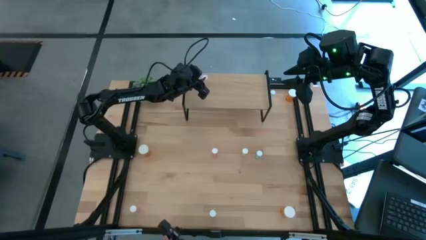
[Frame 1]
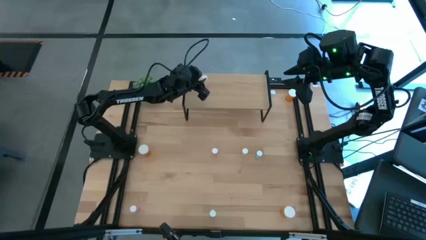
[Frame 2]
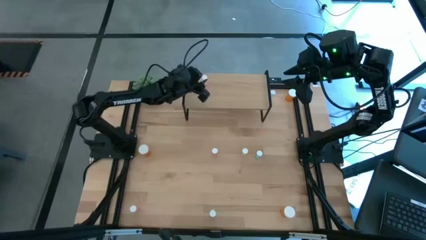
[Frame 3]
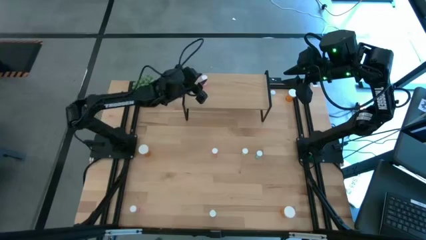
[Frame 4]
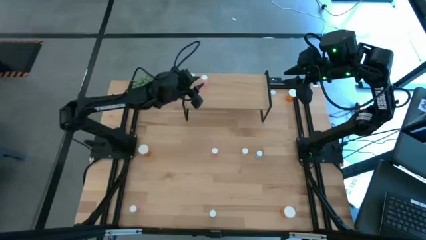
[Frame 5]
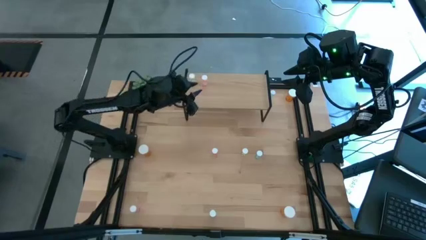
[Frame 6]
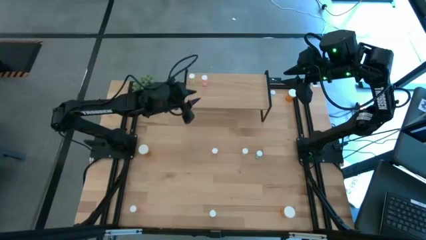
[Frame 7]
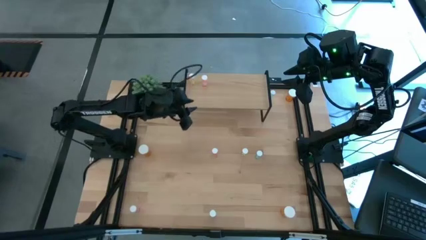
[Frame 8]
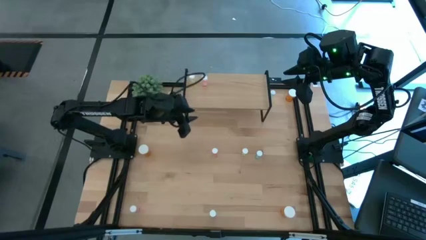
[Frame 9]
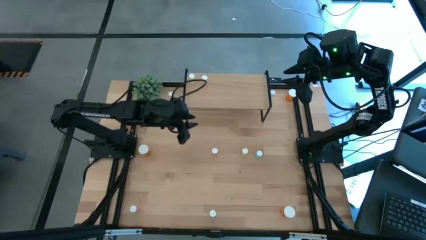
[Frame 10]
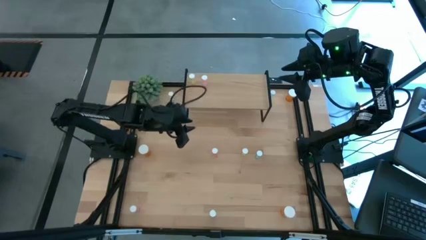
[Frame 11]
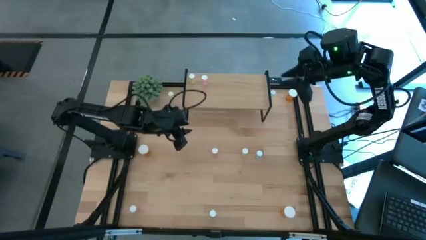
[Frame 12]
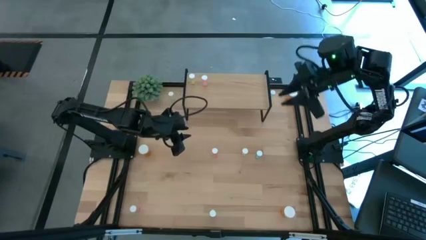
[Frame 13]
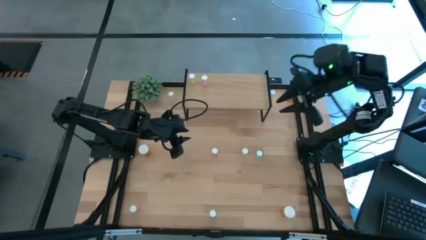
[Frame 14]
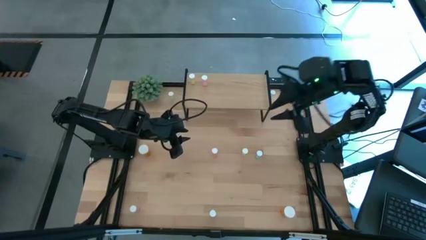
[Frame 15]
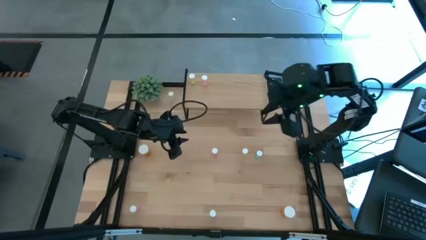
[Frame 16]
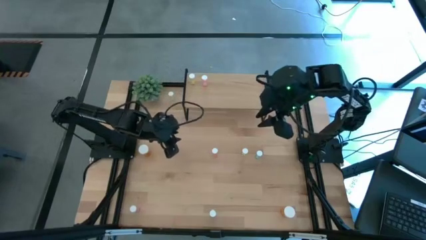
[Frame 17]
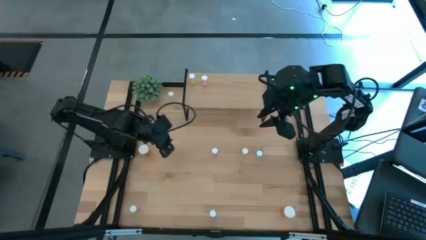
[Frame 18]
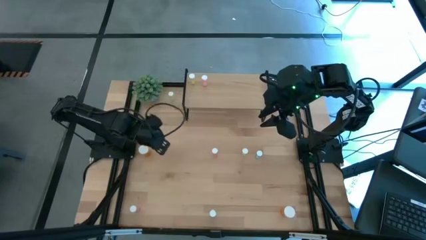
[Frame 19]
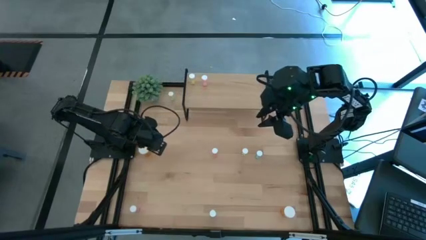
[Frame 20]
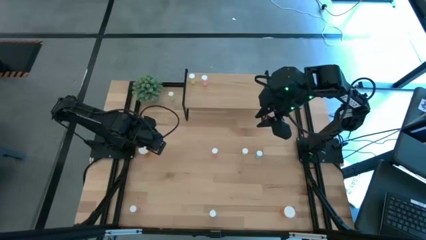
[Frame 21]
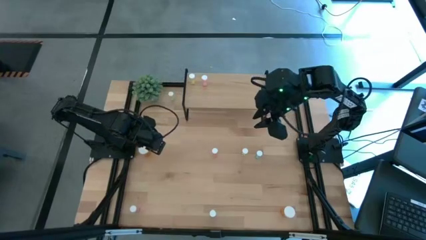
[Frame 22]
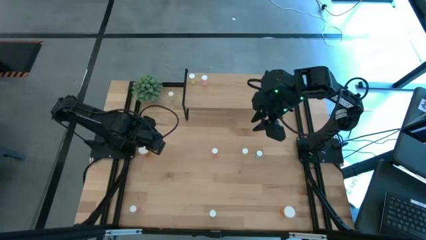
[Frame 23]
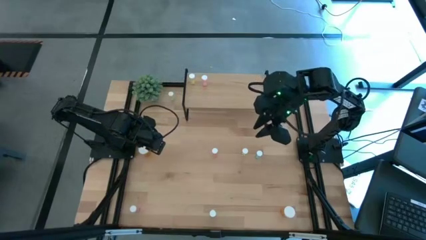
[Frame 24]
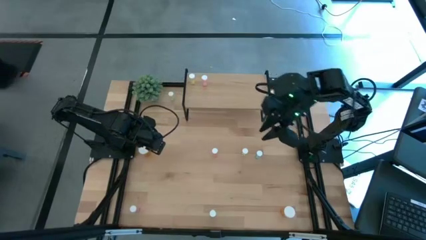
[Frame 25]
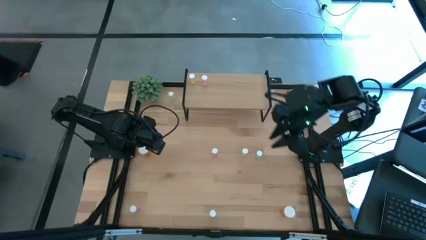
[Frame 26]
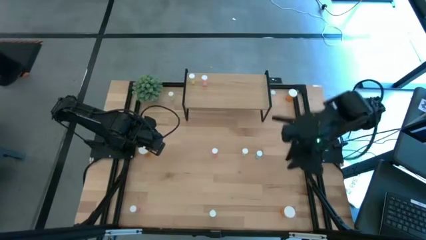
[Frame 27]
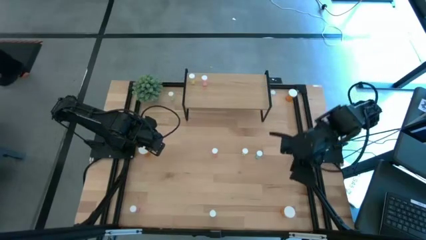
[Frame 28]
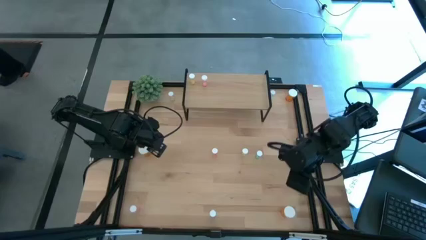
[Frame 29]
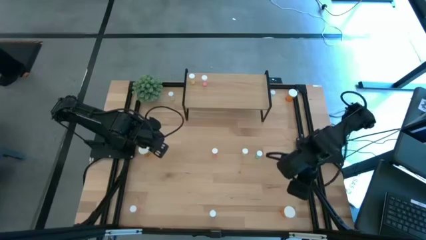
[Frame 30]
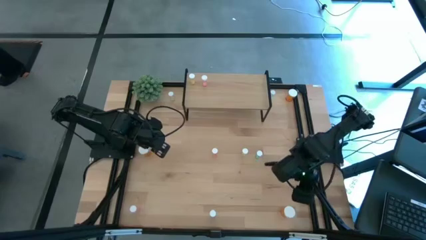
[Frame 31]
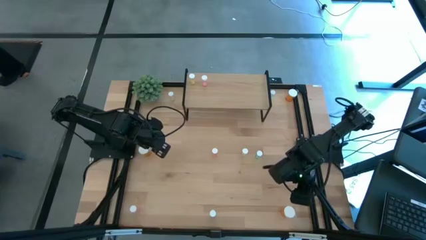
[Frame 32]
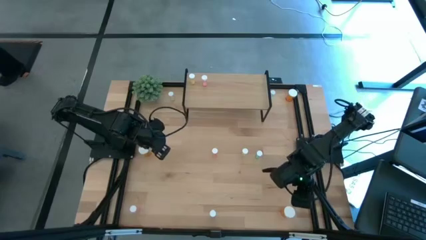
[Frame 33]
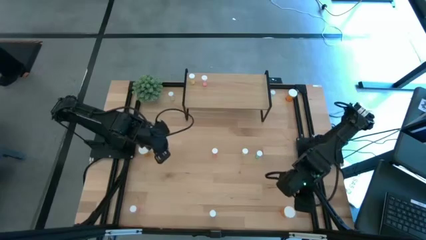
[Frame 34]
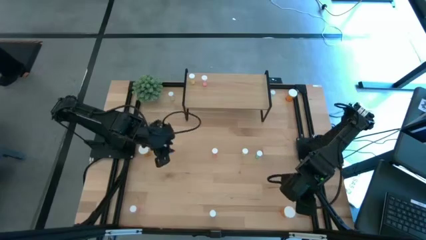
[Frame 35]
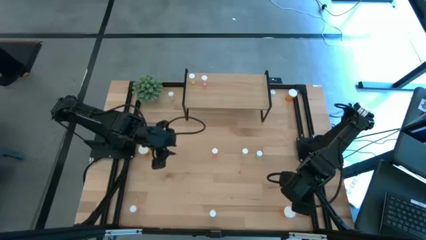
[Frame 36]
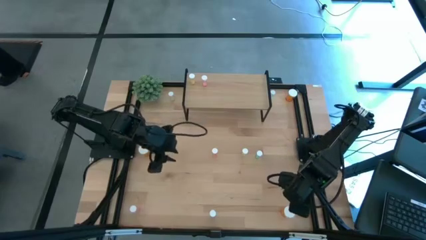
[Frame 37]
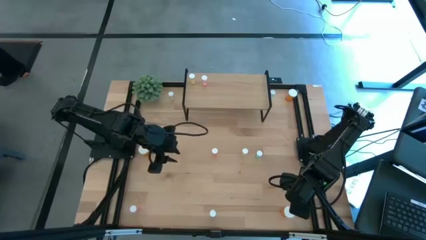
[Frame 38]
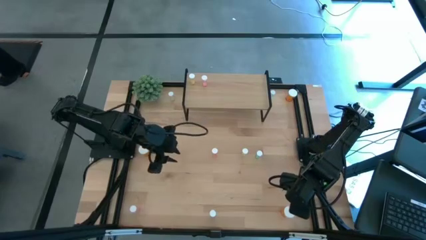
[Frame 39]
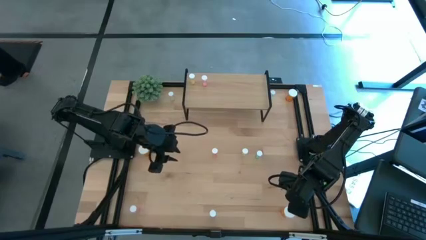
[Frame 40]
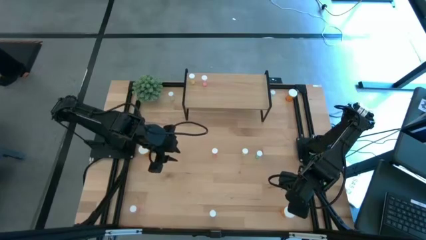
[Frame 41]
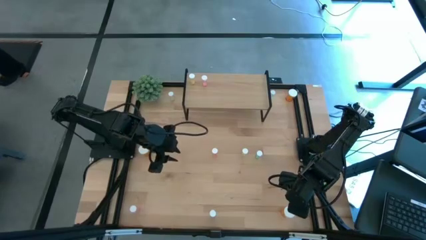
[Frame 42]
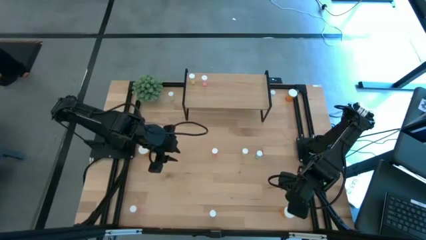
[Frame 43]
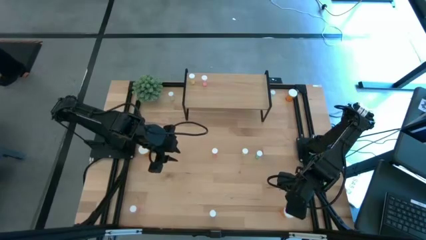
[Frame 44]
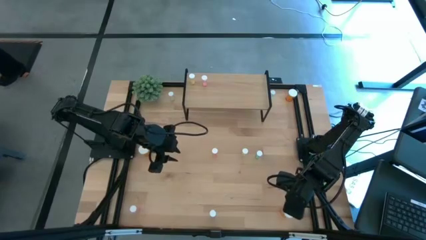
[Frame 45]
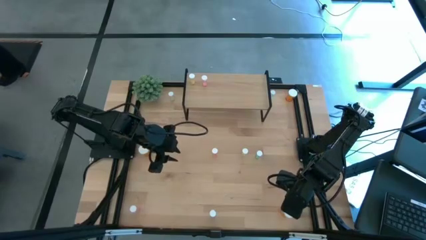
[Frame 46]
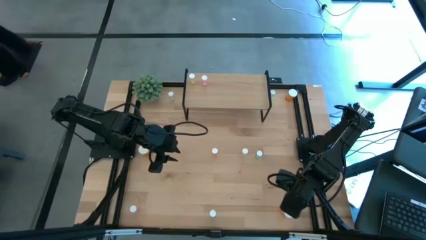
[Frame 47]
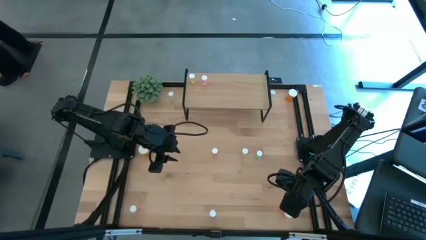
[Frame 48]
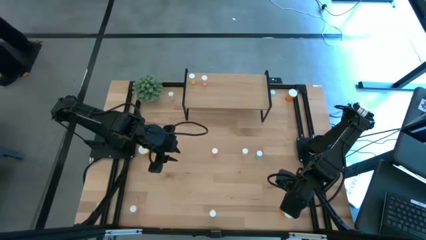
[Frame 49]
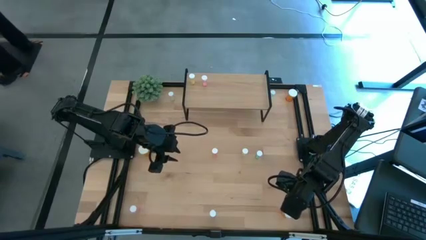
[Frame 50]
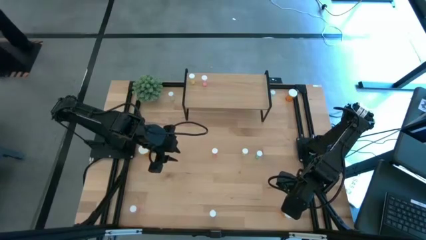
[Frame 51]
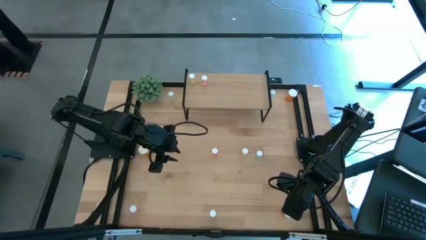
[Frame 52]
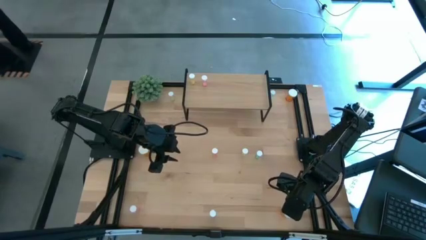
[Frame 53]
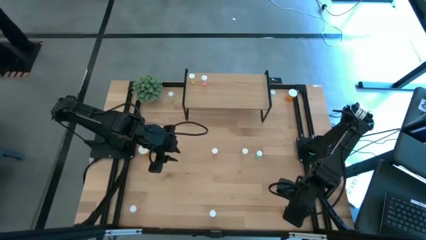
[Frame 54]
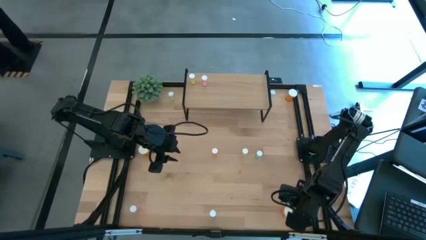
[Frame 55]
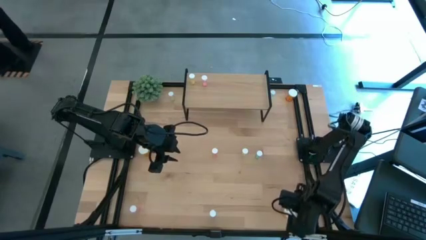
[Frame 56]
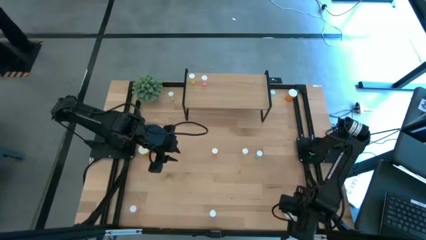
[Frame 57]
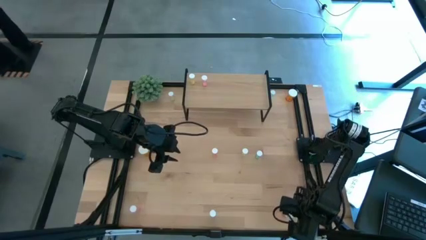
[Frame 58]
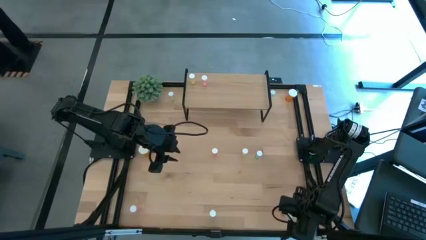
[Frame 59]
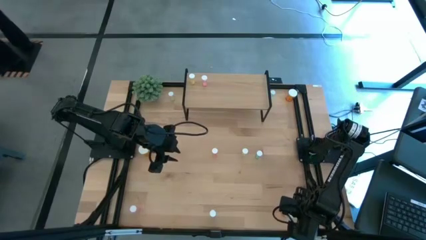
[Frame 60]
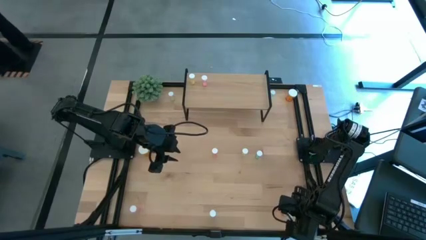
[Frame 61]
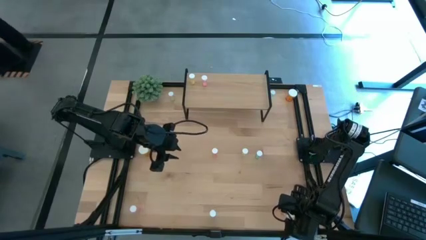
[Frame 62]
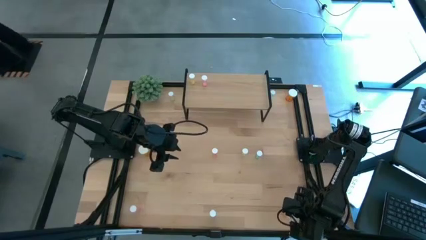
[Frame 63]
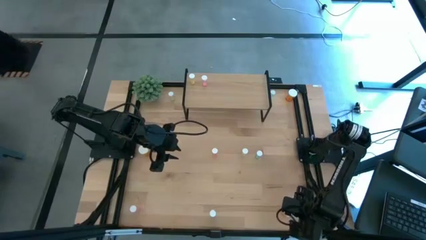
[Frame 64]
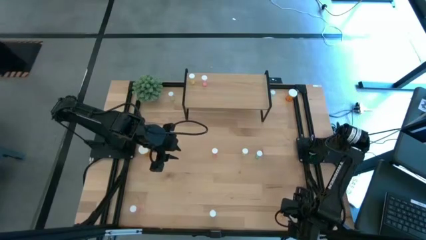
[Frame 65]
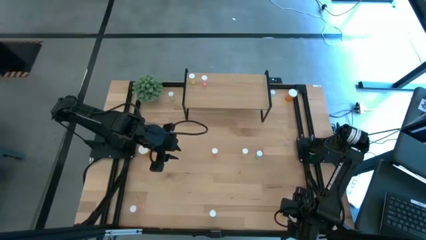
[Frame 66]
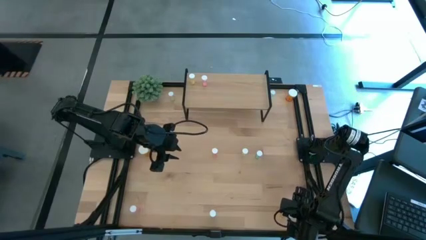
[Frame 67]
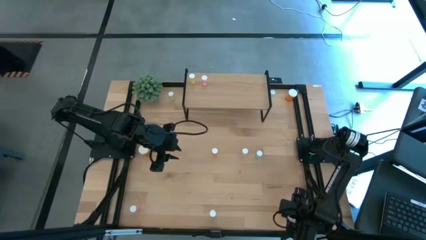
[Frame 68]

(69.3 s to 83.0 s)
Task: Pick and place medicine bottles onto shelf by color
Put the bottom orange pill bottle on the shelf

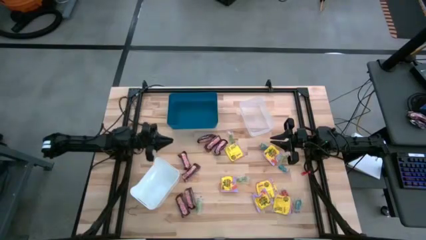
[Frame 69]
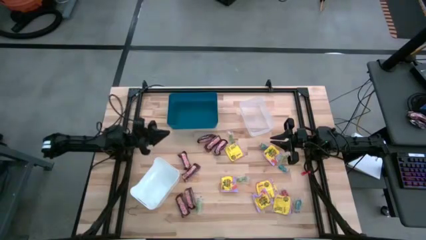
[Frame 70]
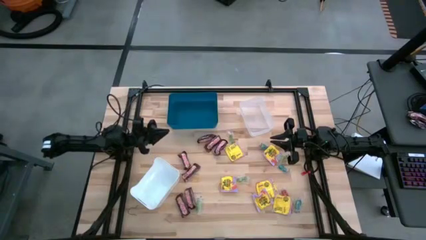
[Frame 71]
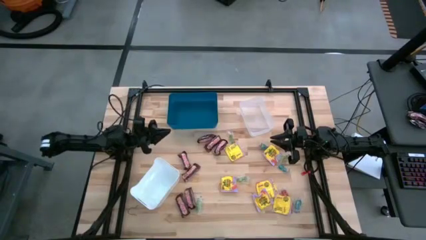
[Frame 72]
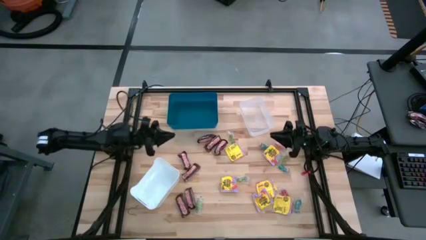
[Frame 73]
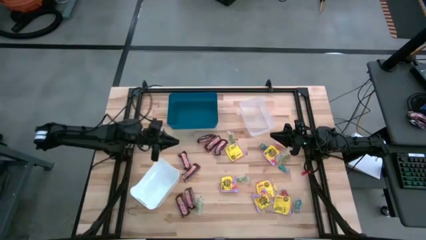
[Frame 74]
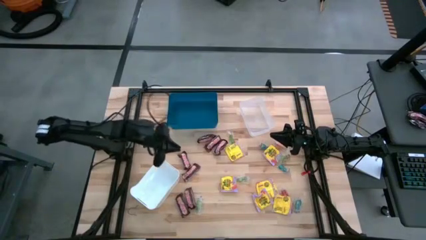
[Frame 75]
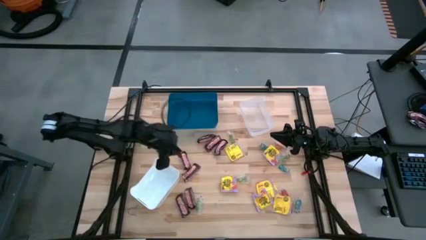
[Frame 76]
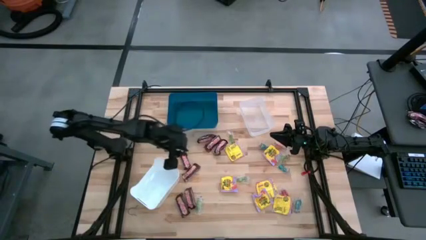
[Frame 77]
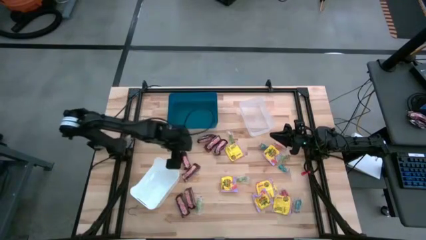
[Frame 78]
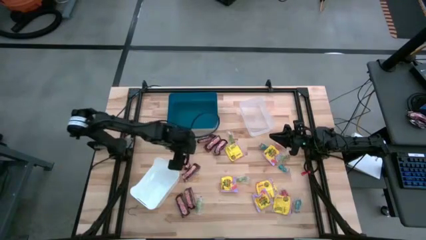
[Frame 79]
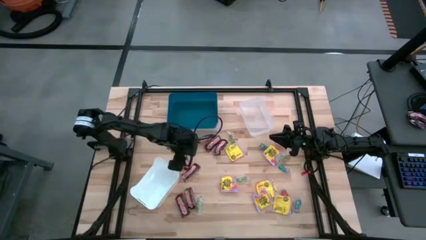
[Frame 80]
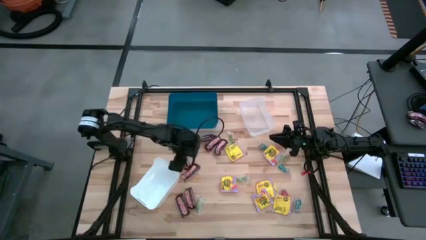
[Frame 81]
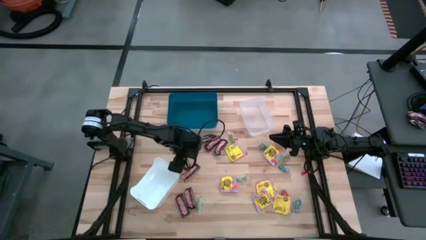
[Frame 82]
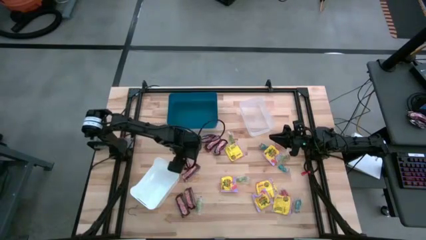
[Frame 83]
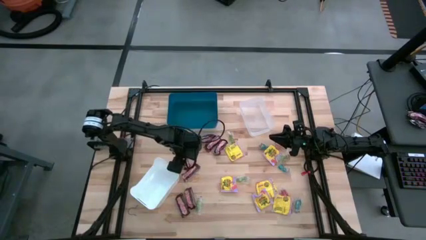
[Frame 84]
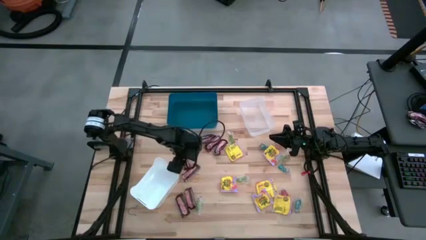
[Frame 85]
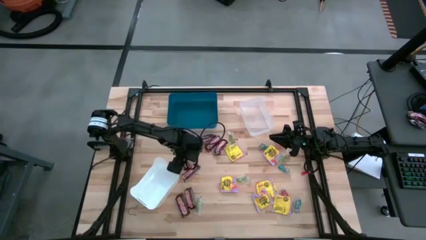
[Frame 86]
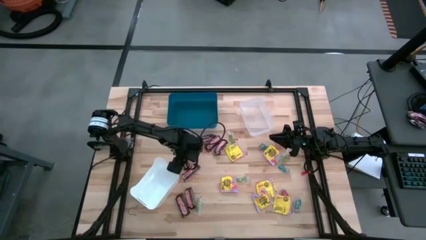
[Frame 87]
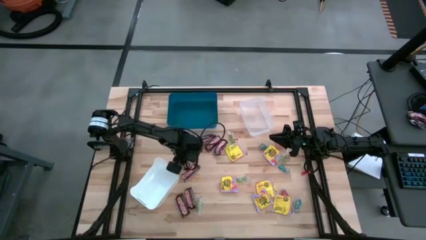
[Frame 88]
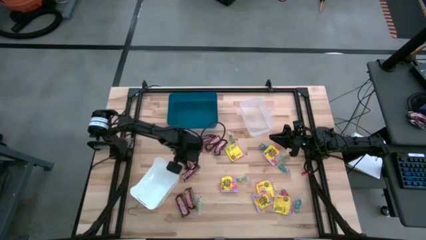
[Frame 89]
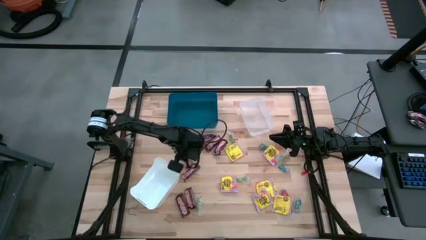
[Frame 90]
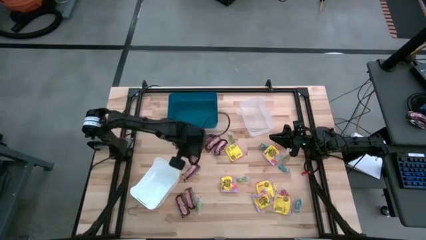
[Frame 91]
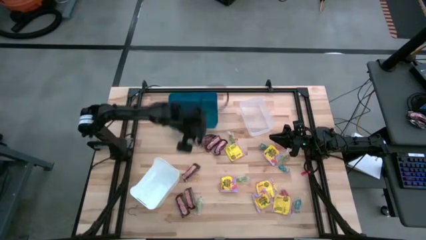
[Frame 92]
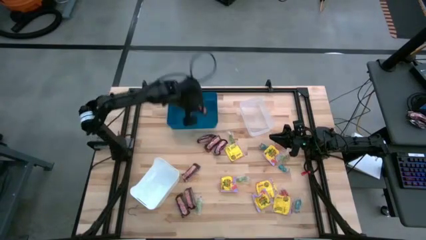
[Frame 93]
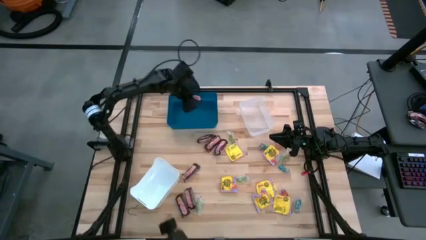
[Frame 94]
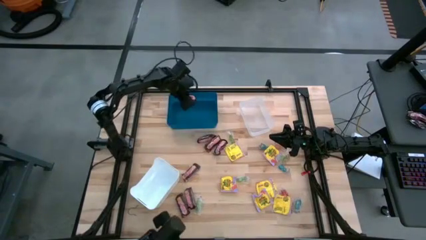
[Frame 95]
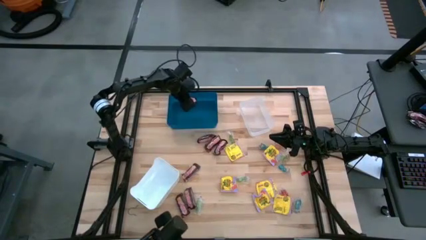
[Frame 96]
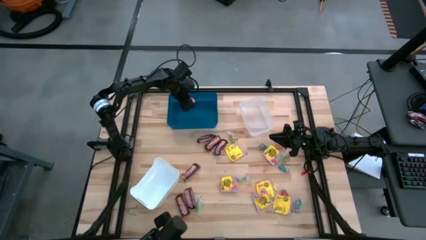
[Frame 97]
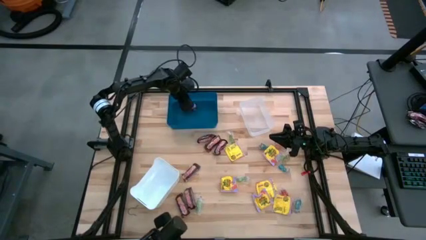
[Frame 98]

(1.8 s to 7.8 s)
Task: Sort candy
Put the brown chocolate into the blue bin
